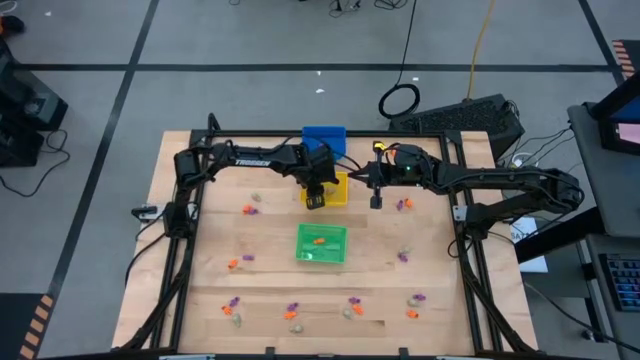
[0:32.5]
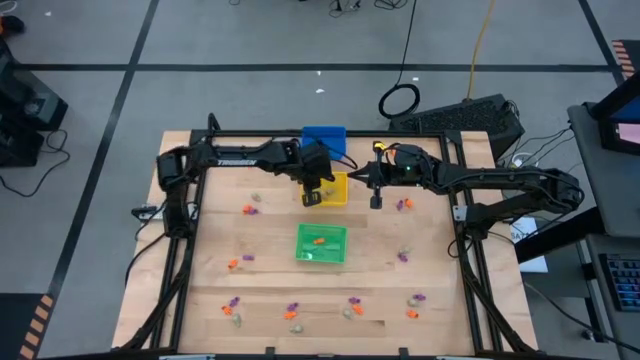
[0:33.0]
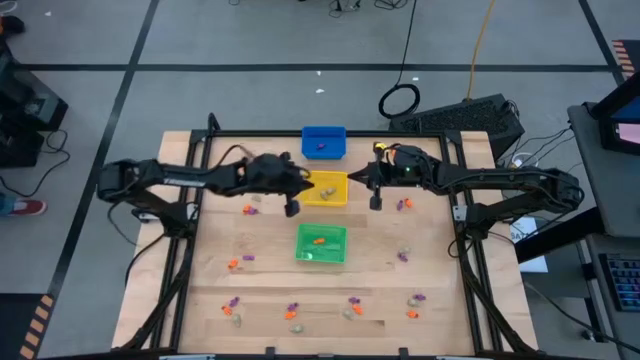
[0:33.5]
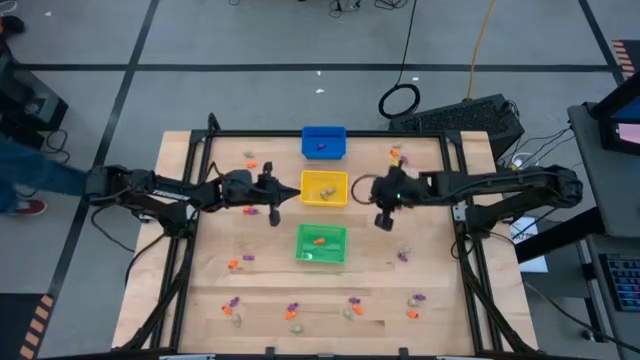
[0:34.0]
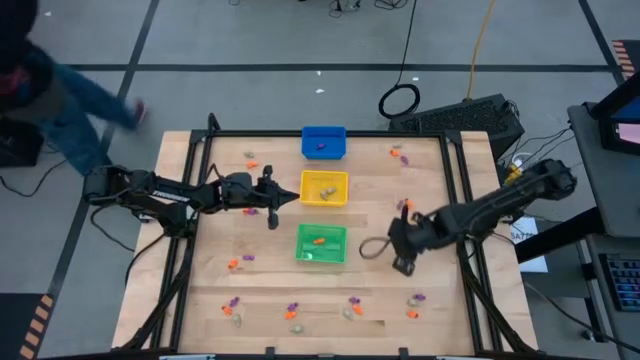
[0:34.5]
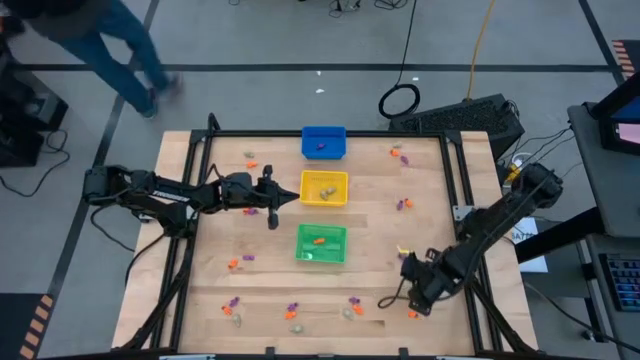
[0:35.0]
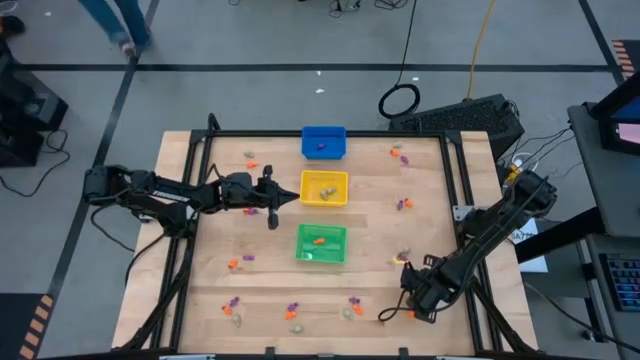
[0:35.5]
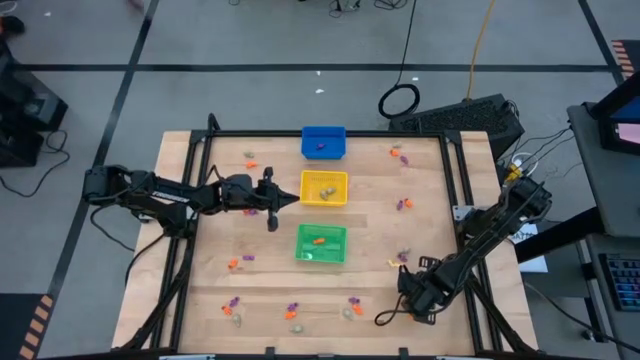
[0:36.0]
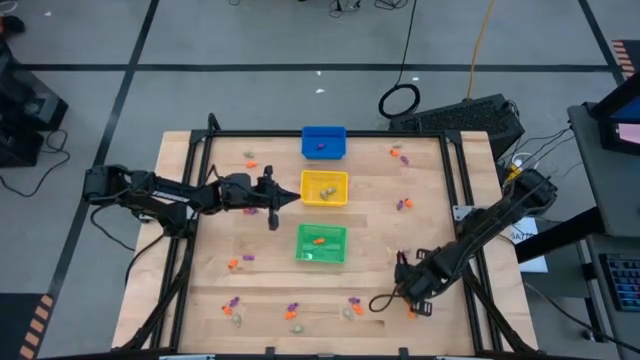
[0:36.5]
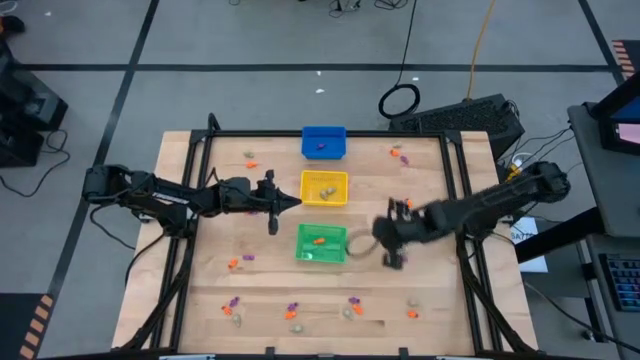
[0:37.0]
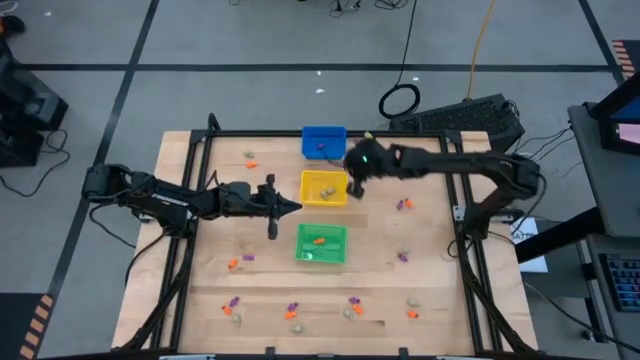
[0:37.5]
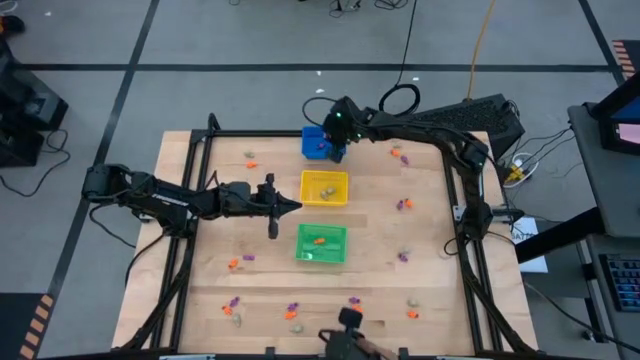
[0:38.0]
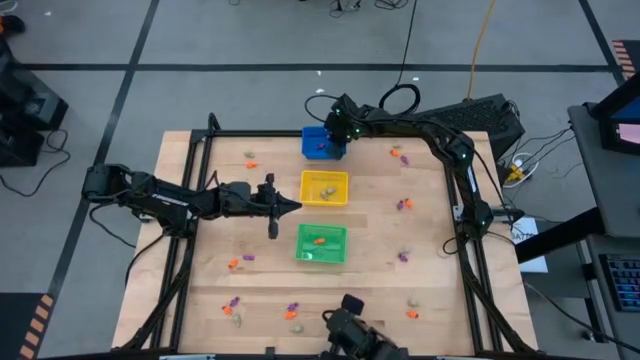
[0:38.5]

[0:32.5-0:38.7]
Task: Sort Halloween decoration
Put the purple skeleton toy into the blue bin

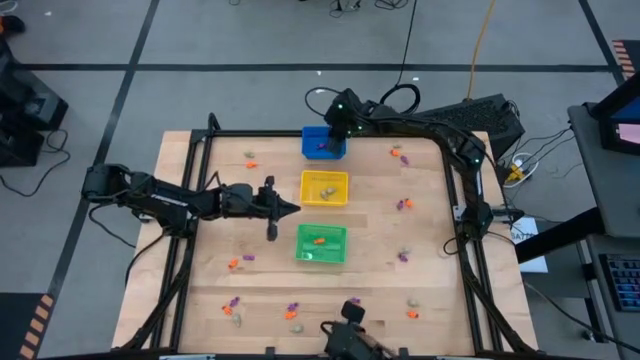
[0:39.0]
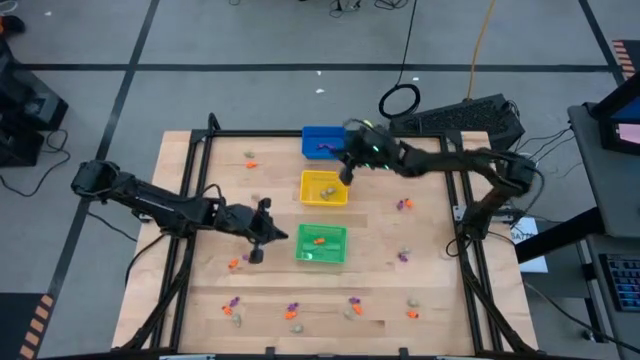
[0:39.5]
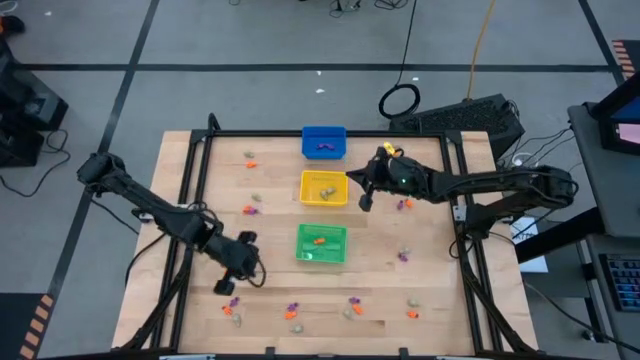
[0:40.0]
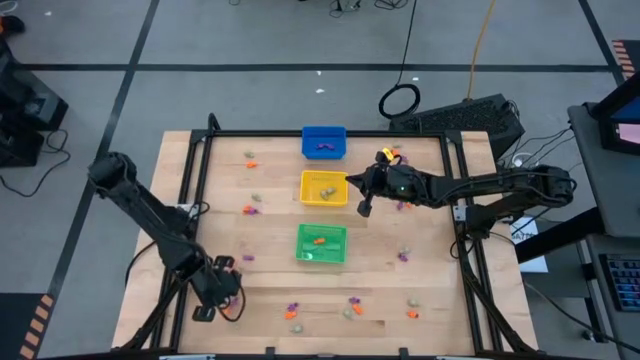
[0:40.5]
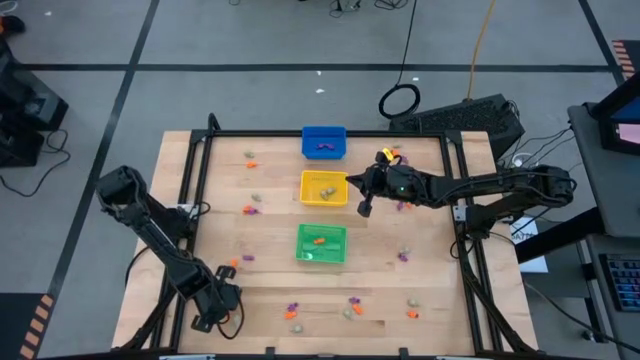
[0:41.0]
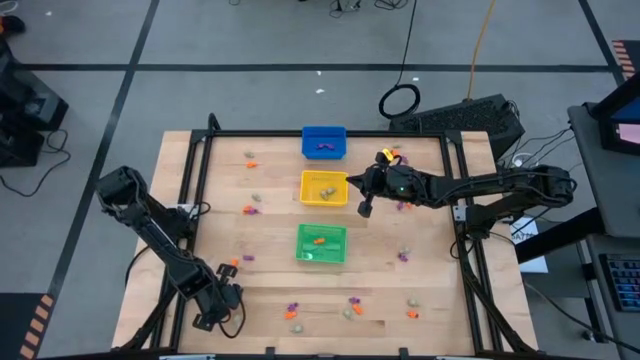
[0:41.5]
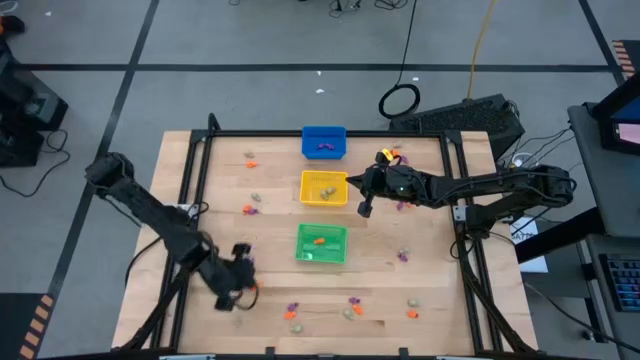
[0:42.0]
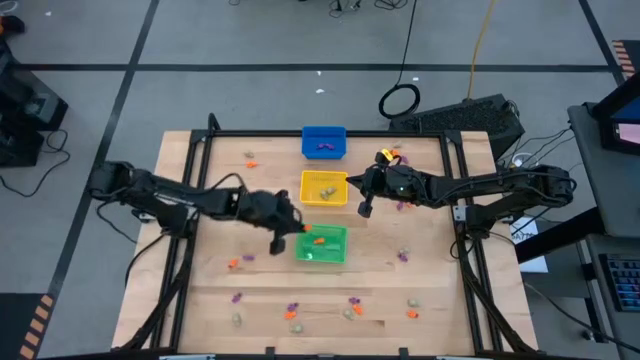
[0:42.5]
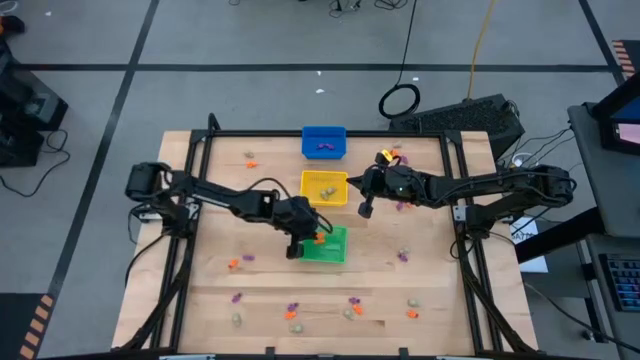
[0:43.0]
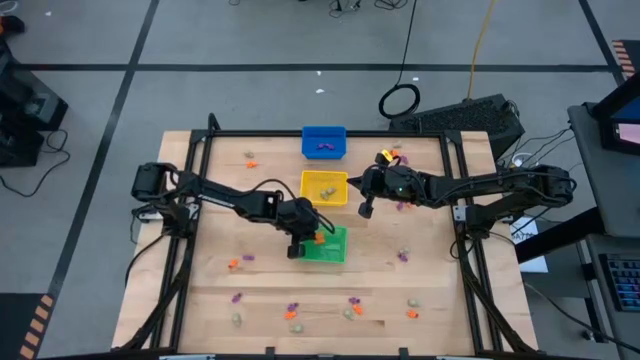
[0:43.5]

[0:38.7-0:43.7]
Put the orange skeleton toy into the green bin

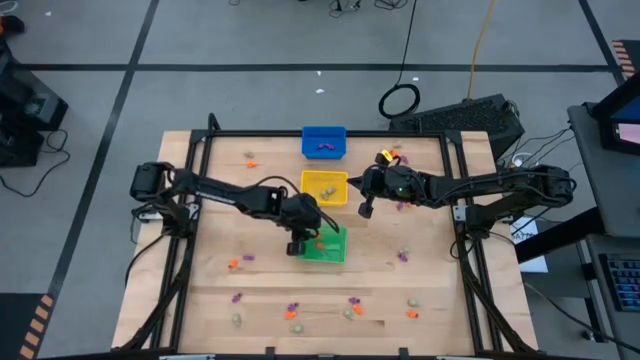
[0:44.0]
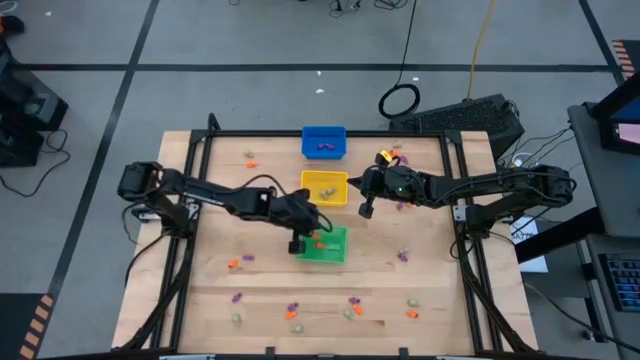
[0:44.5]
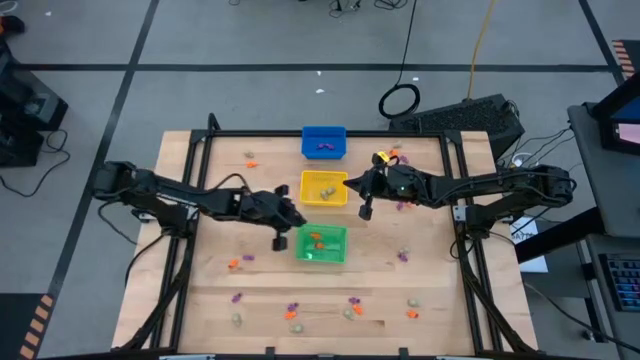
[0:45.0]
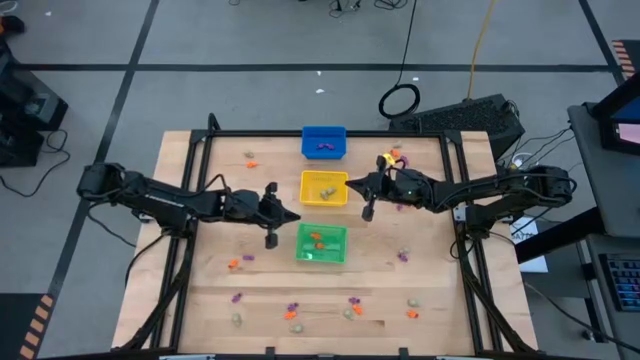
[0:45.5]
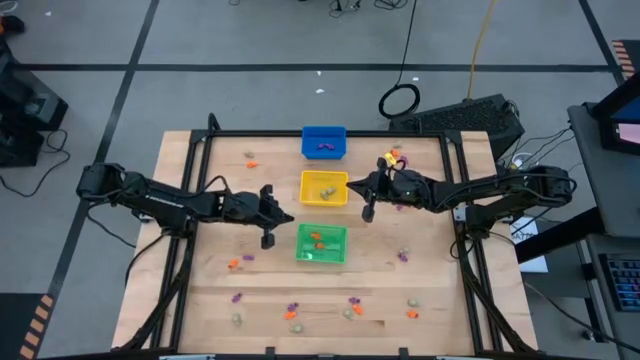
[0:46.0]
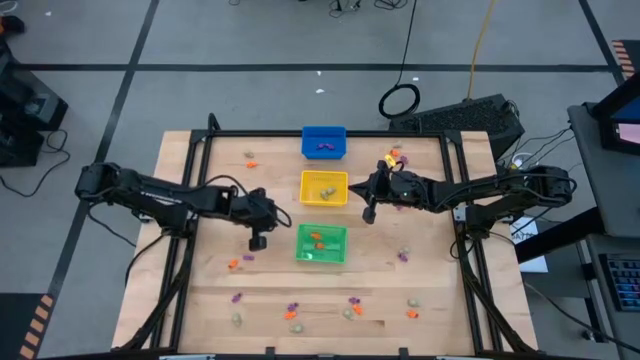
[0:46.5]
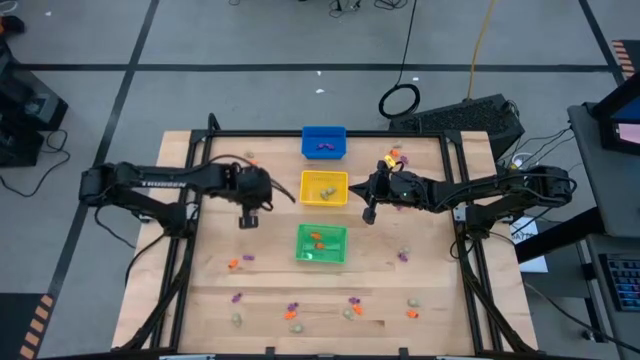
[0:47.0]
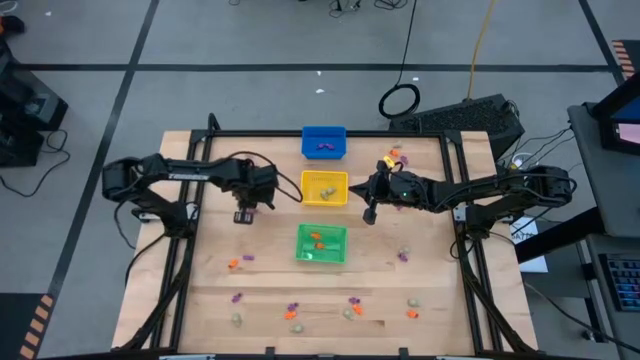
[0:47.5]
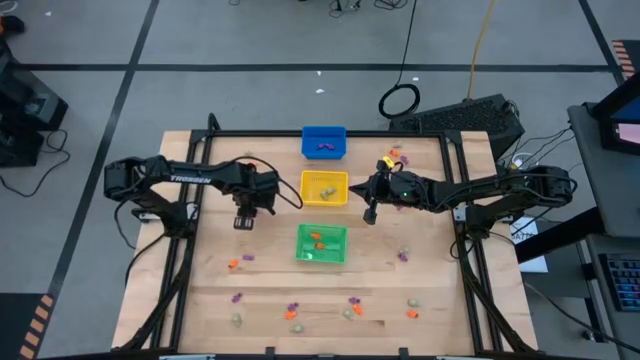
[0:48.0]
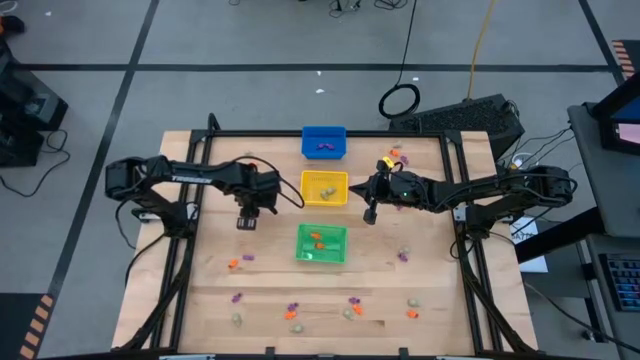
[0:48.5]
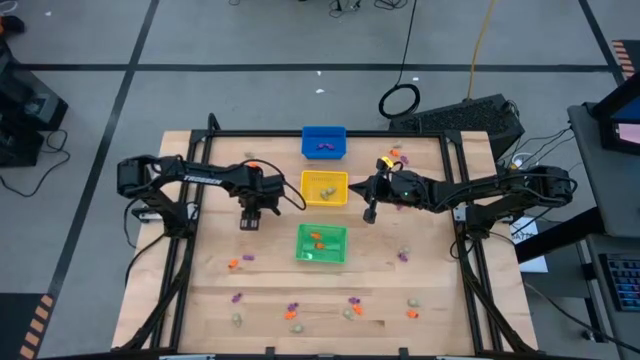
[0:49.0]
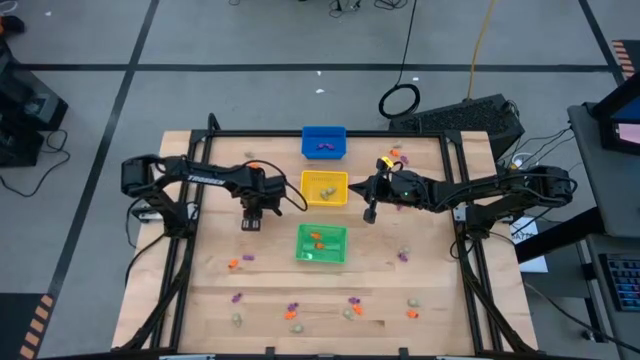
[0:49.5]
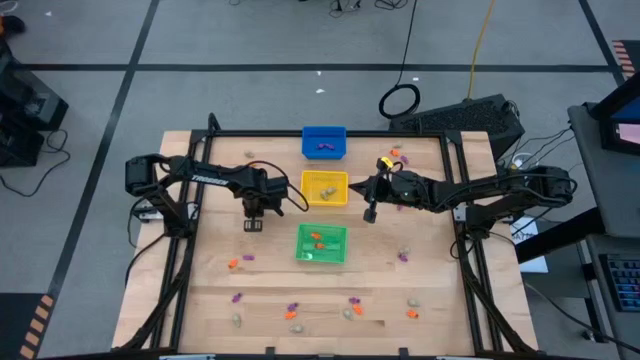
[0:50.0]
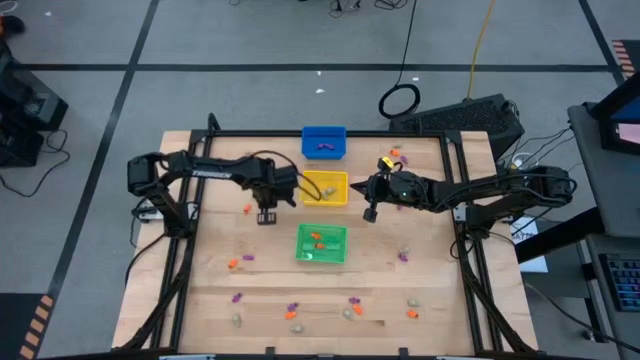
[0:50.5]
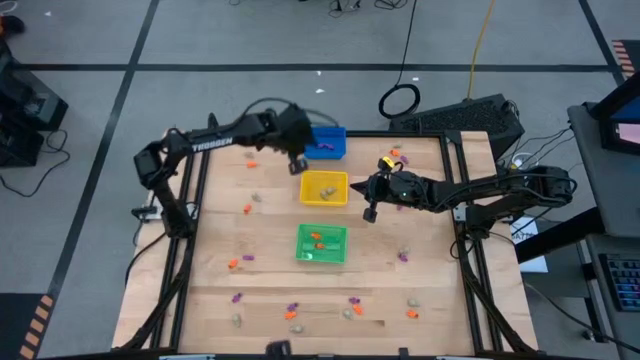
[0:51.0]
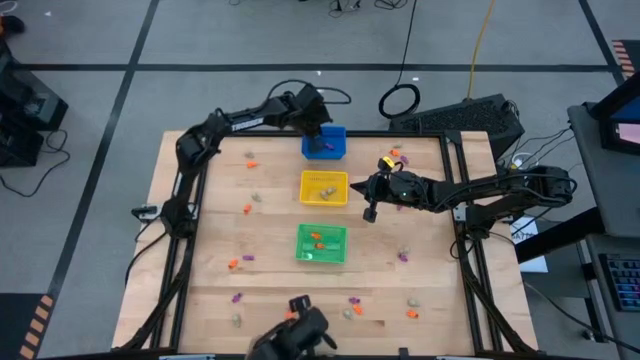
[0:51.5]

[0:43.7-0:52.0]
Put the purple skeleton toy into the blue bin

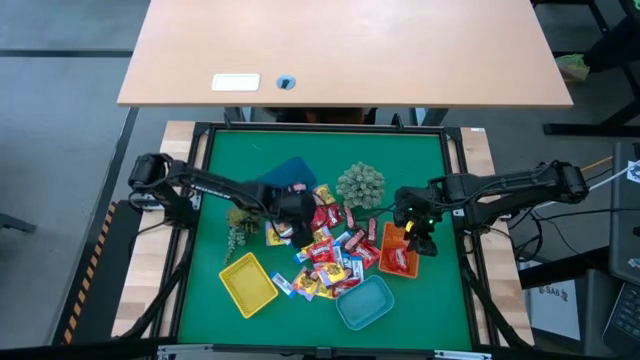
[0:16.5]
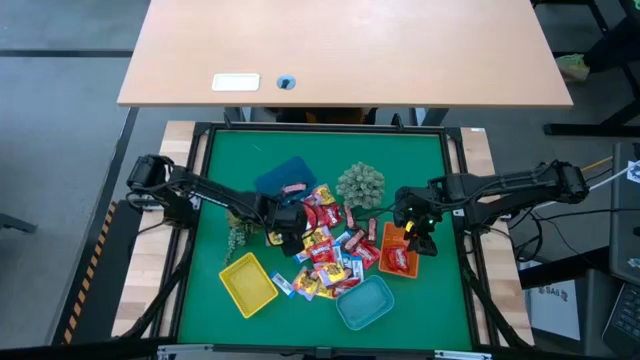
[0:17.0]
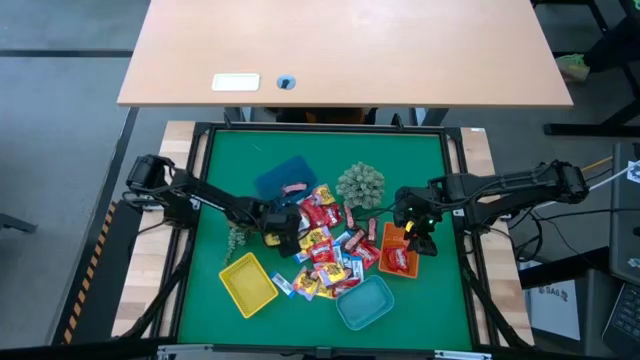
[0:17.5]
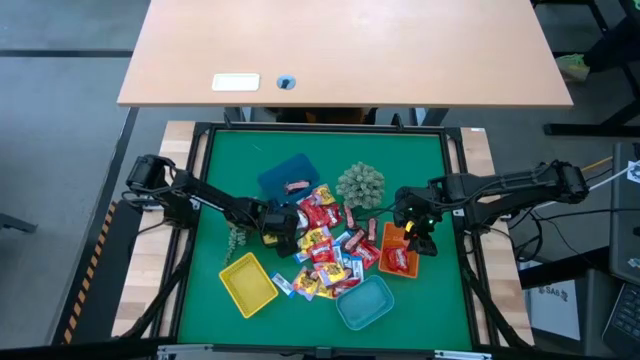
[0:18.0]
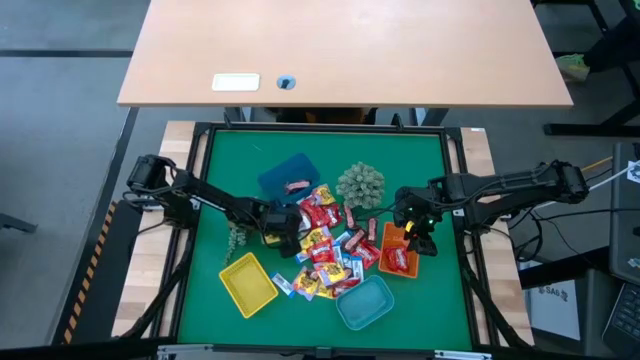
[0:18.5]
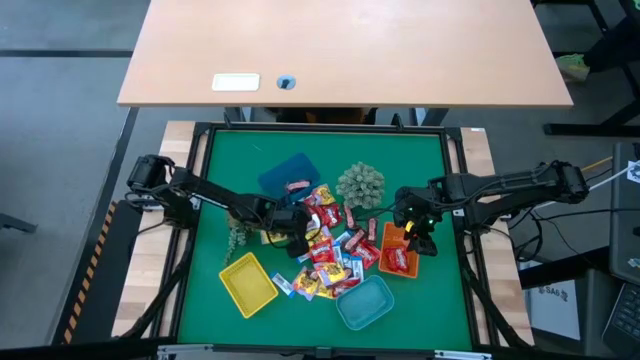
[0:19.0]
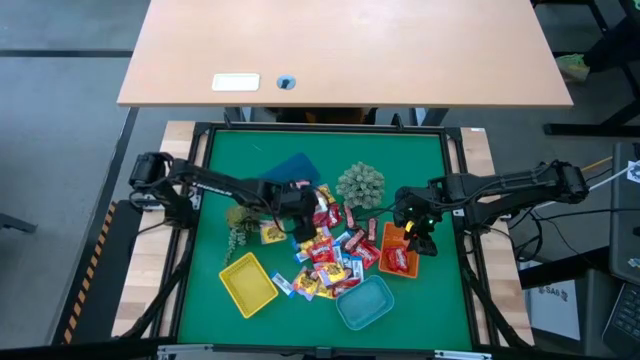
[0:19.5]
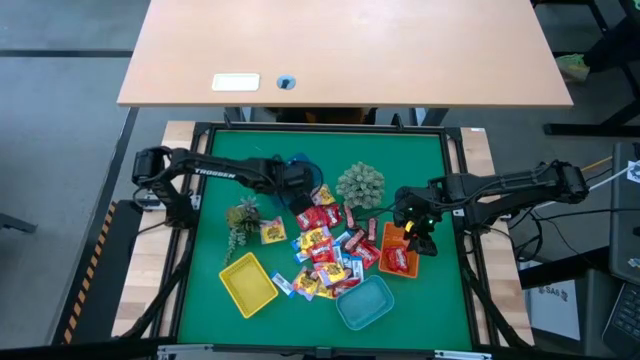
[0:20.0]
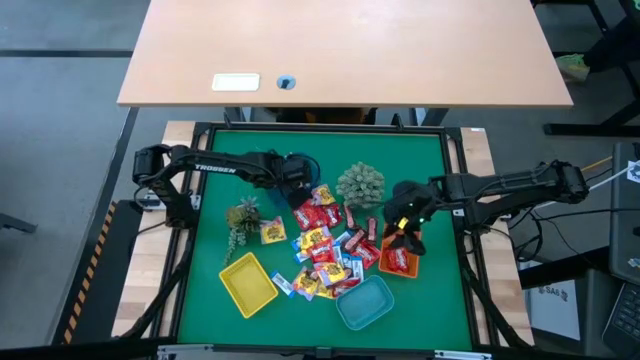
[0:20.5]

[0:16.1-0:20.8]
Task: Sort candy
Put the white chocolate into the blue bin
